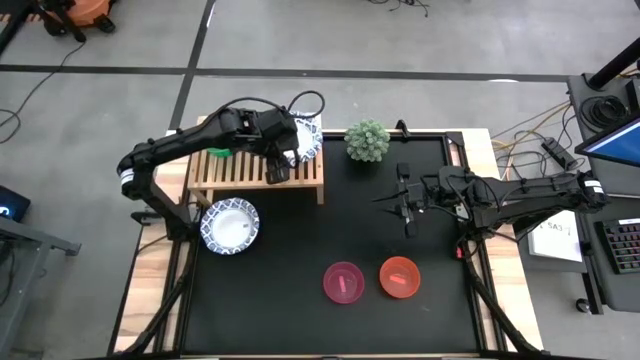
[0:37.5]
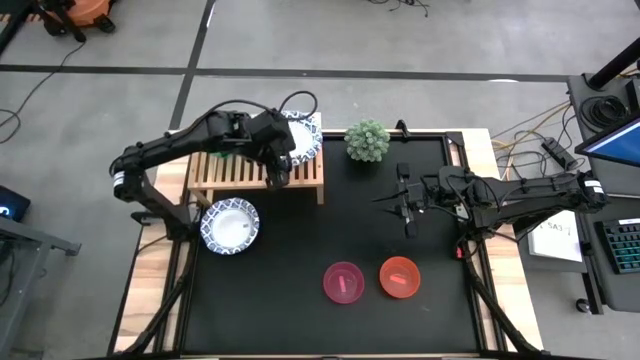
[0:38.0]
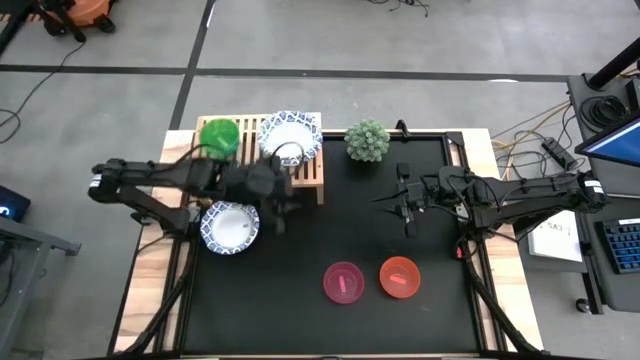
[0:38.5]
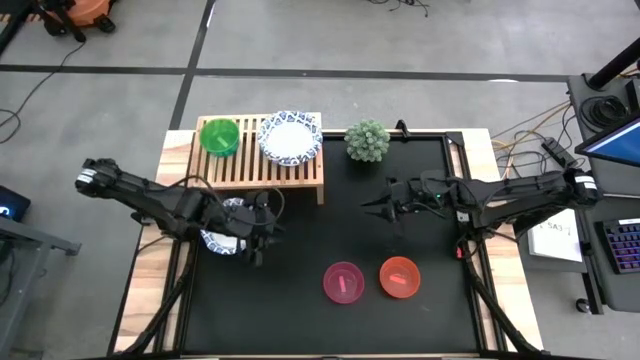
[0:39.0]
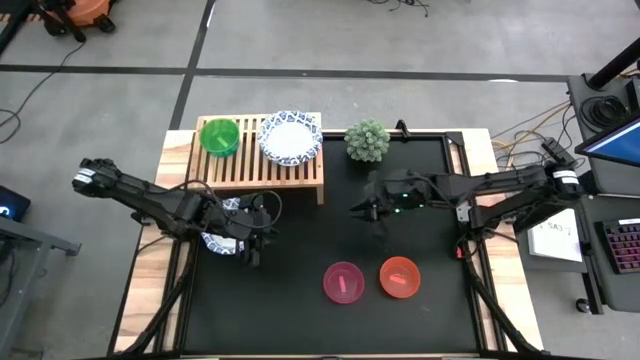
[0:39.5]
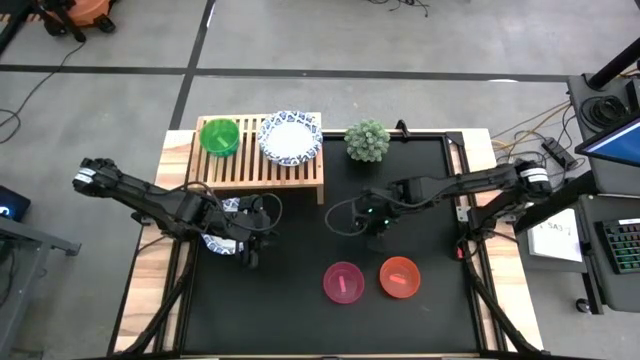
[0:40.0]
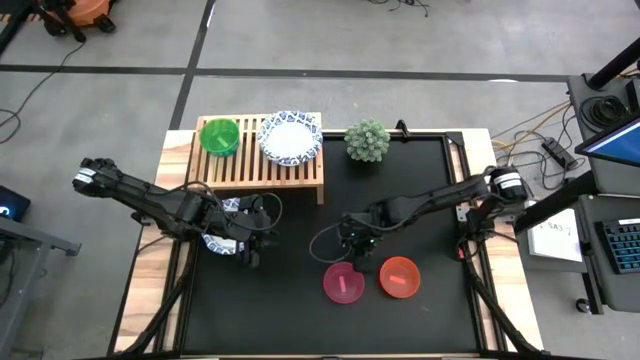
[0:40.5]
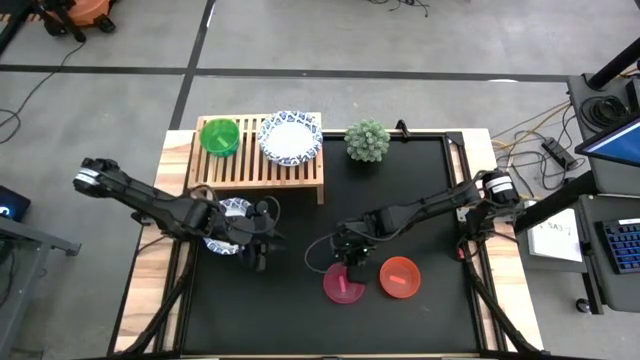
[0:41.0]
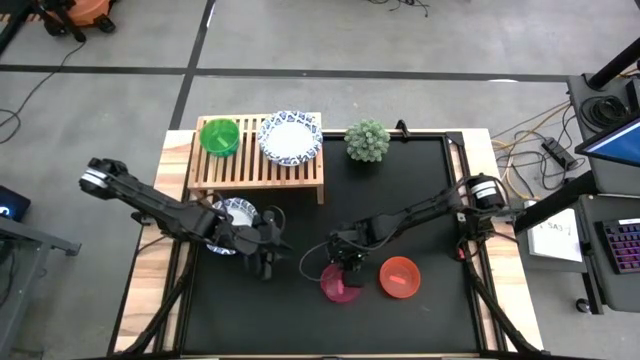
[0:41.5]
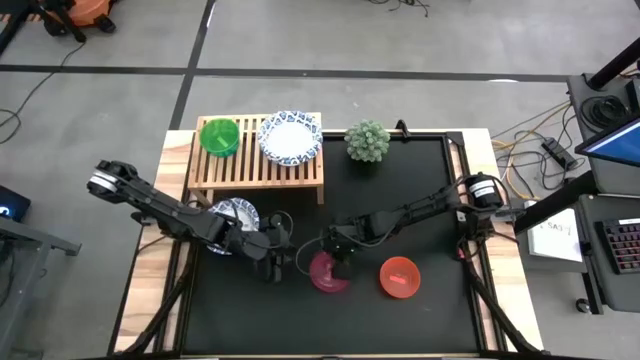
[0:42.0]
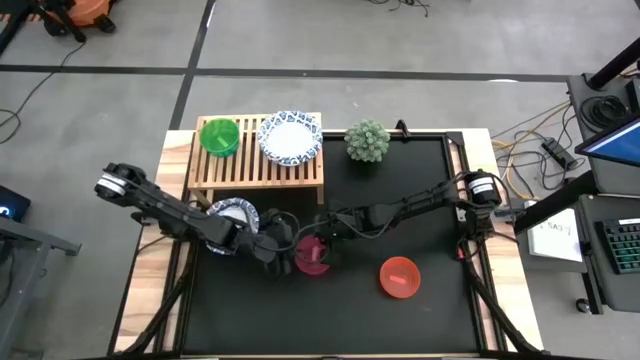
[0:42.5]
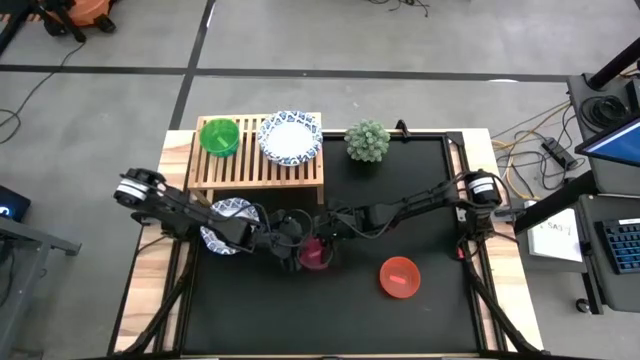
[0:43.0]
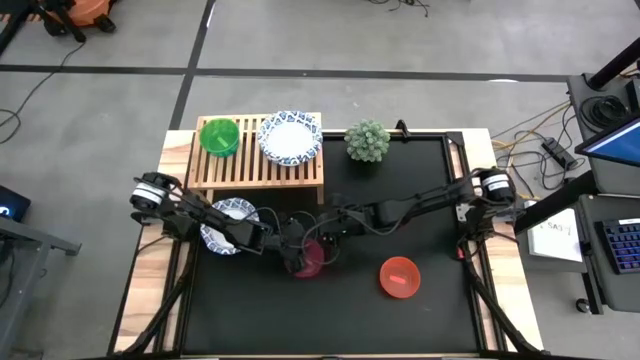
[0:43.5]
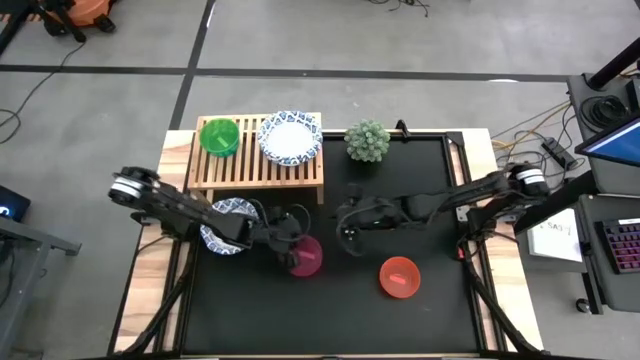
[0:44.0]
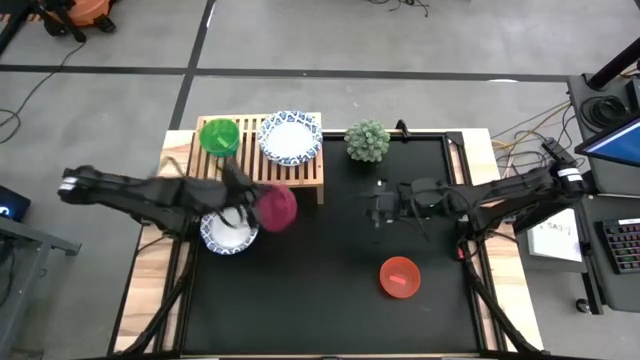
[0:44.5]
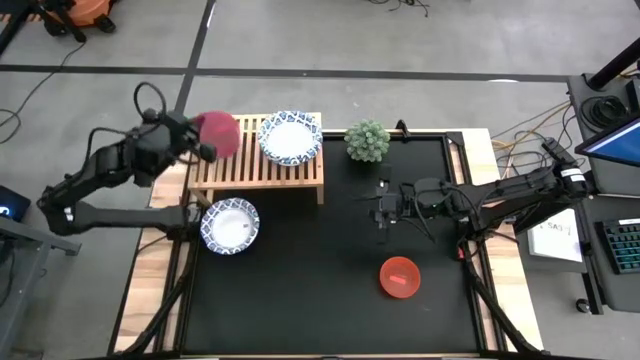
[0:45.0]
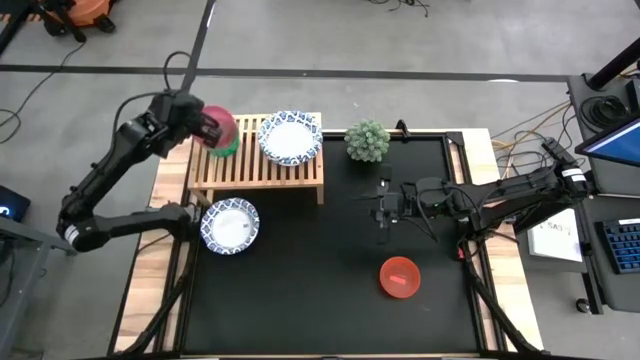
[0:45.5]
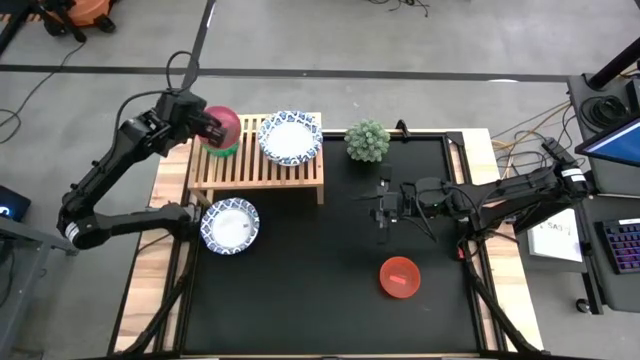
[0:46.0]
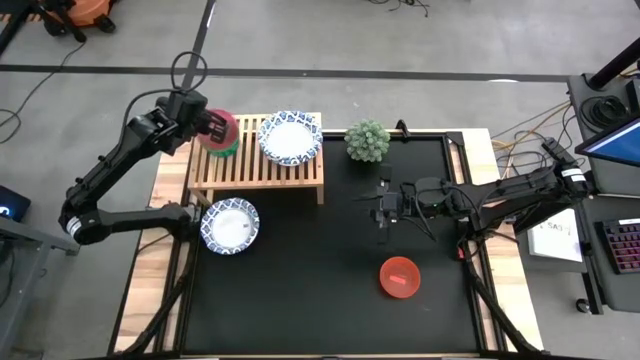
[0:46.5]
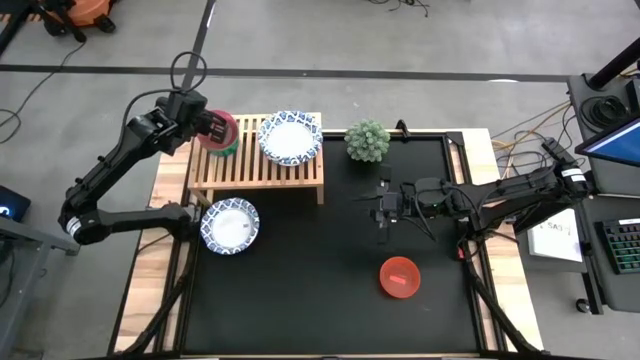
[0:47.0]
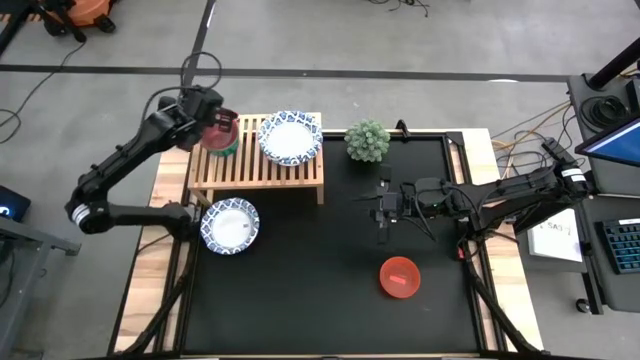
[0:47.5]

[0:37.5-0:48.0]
Task: Place and stack bowls onto a shelf
Stack the pink bowl on top of the green bowl on the shelf

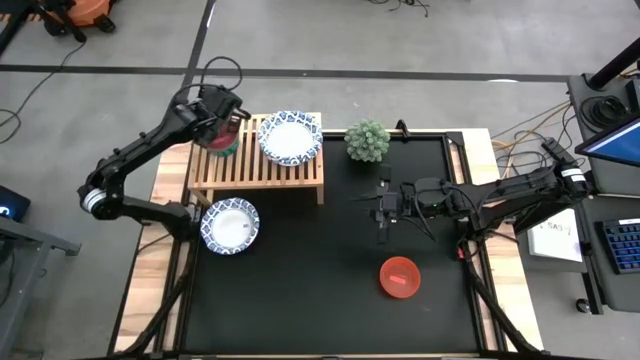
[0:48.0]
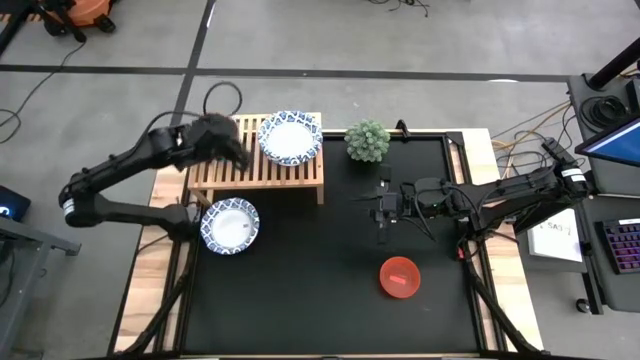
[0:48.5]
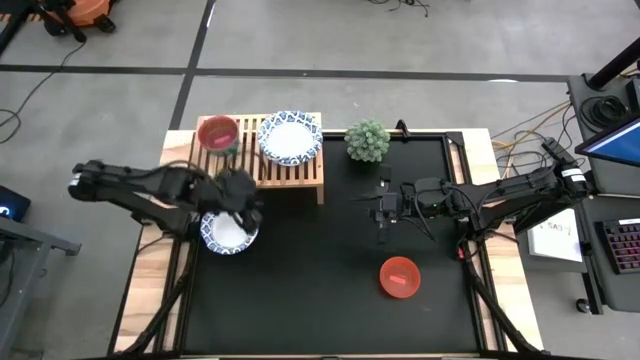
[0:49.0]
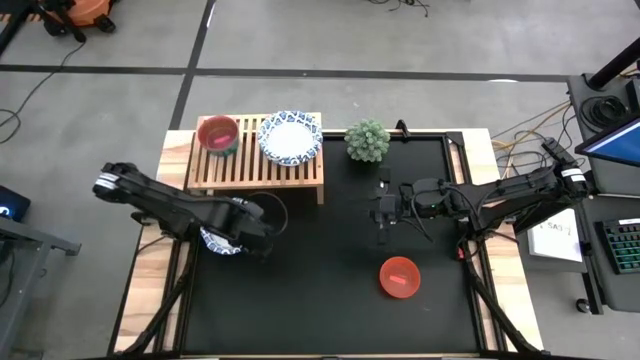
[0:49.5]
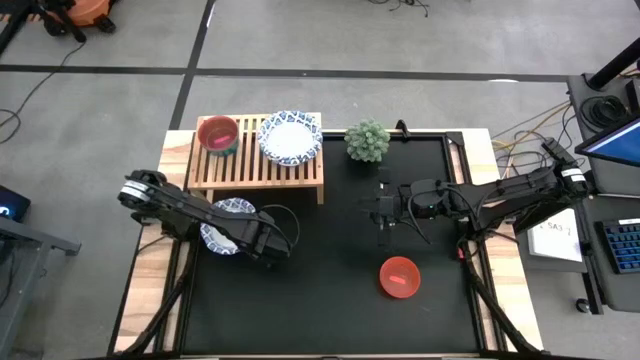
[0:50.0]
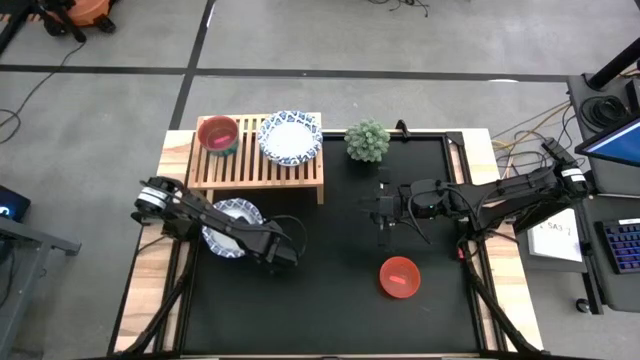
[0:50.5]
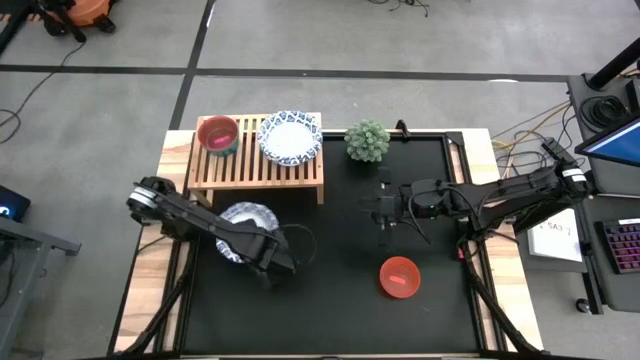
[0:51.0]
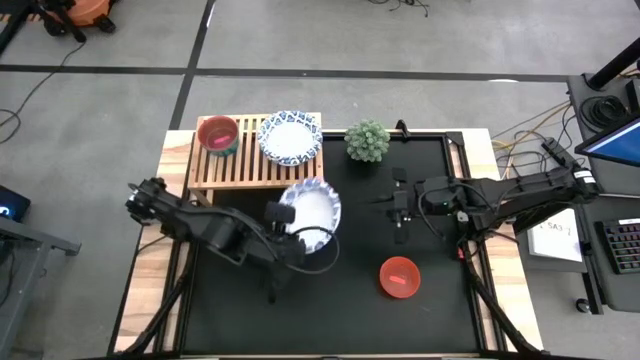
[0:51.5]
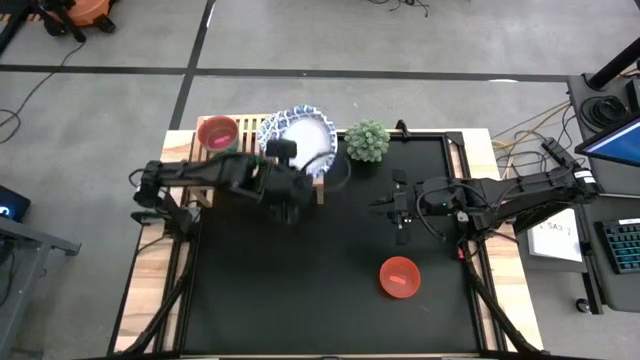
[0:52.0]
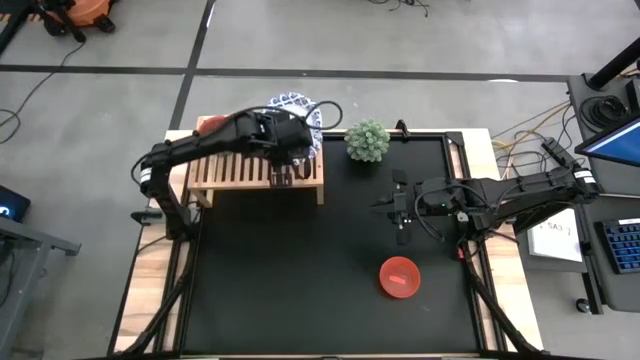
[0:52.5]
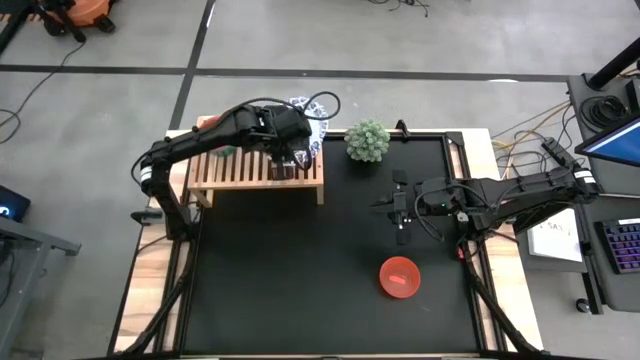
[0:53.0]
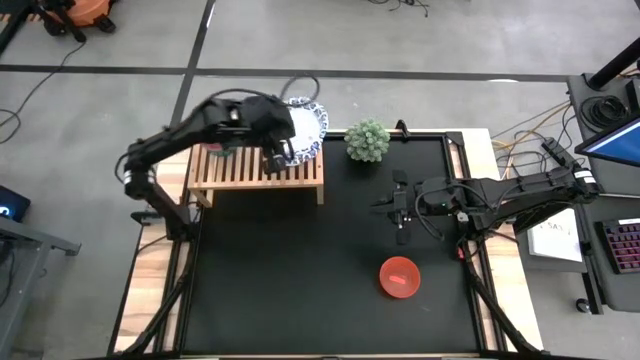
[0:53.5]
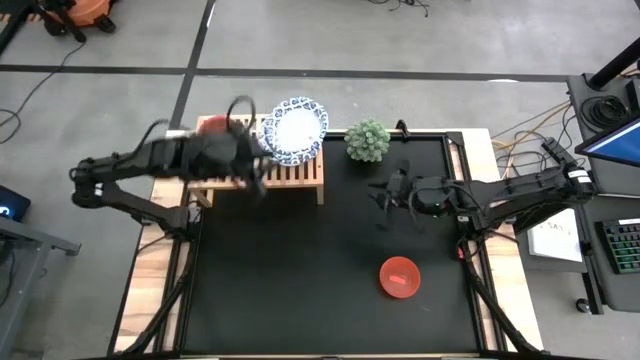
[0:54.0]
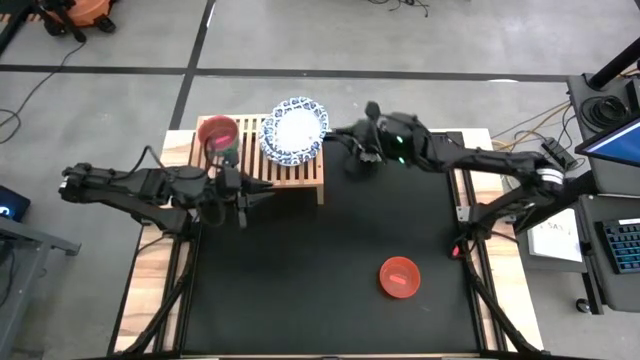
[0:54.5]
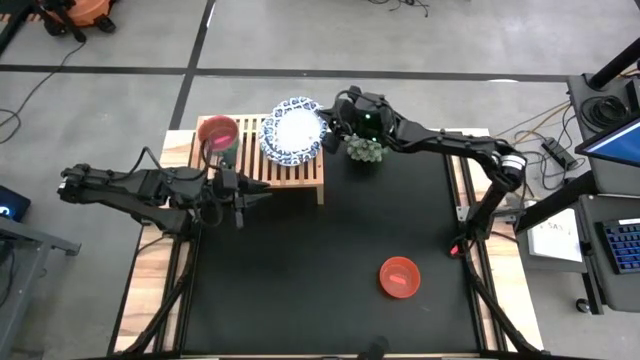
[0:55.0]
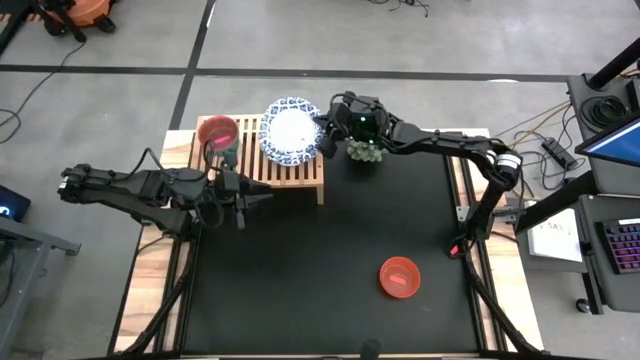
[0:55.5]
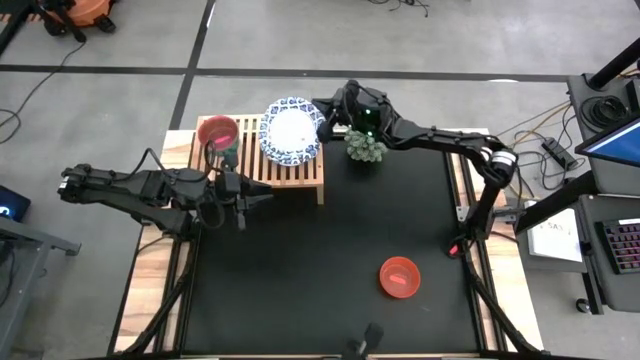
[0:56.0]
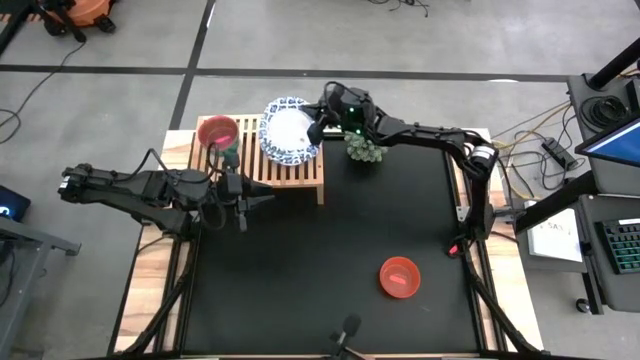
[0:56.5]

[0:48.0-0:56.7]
Stack the blue patterned bowl on top of the blue patterned bowl on the shelf

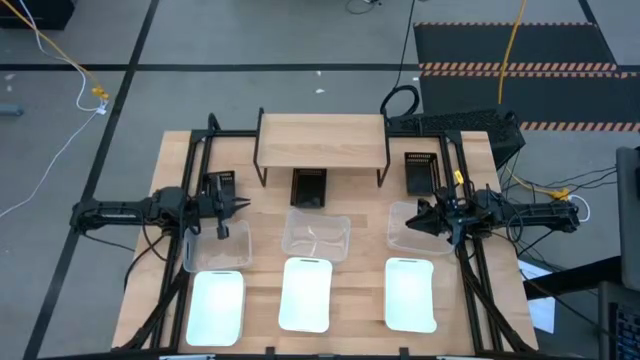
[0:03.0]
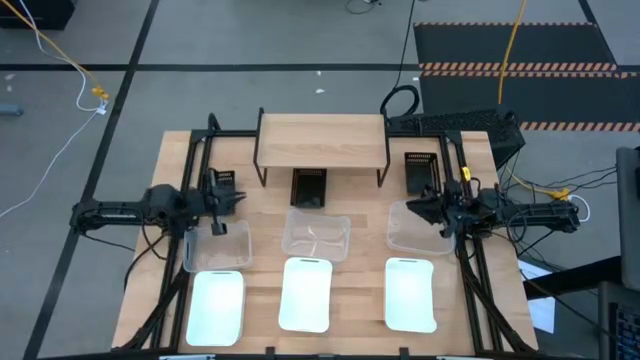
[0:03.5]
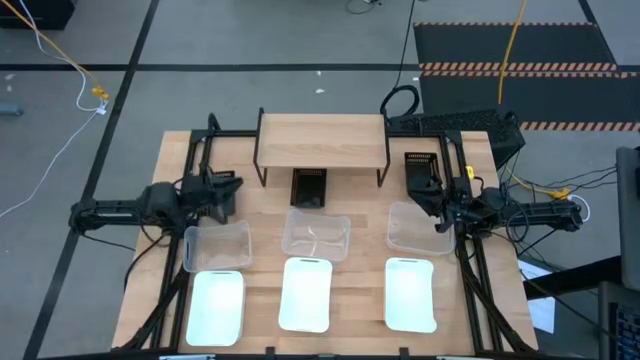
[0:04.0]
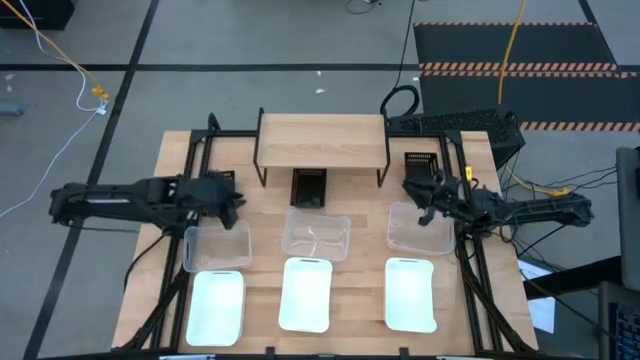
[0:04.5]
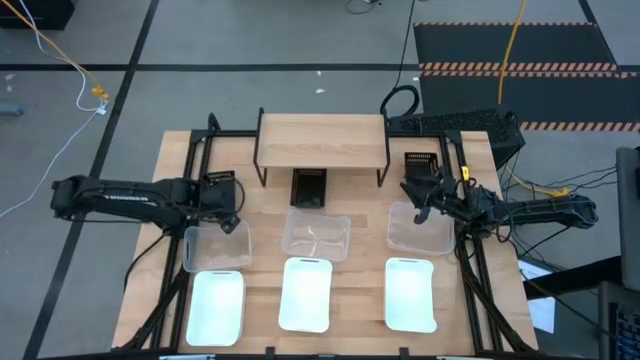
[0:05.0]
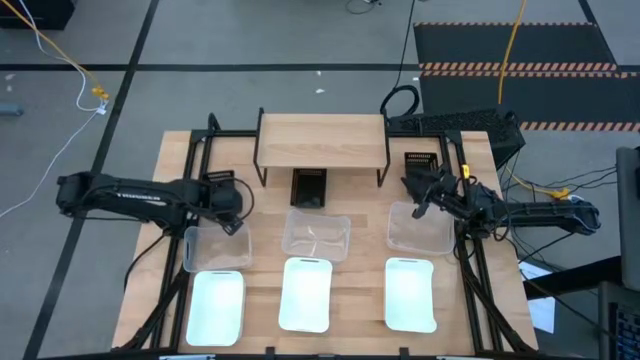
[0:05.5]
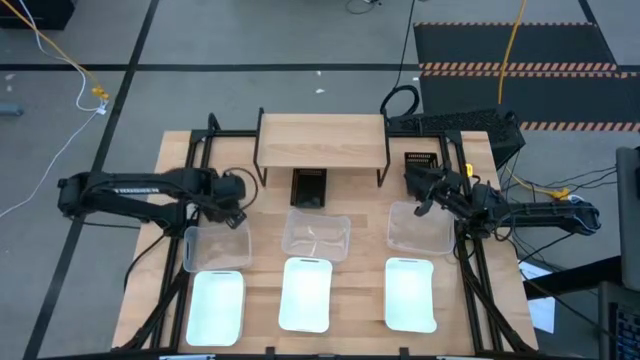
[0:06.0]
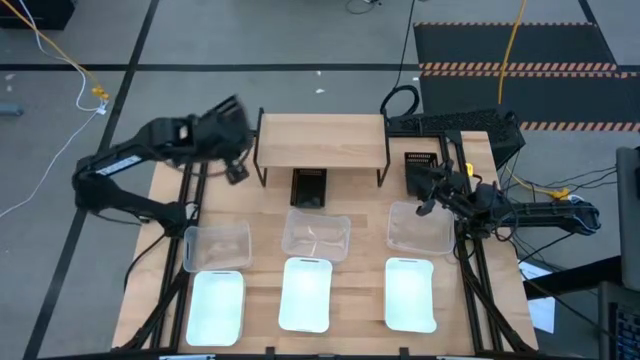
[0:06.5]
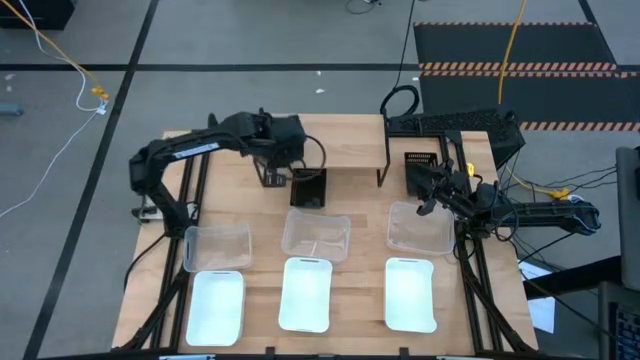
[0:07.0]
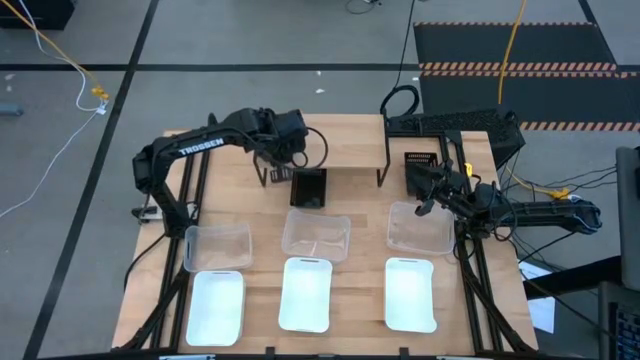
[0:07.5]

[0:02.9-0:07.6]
Task: Stack baskets on shelf by color
Put the left black bin on the shelf
